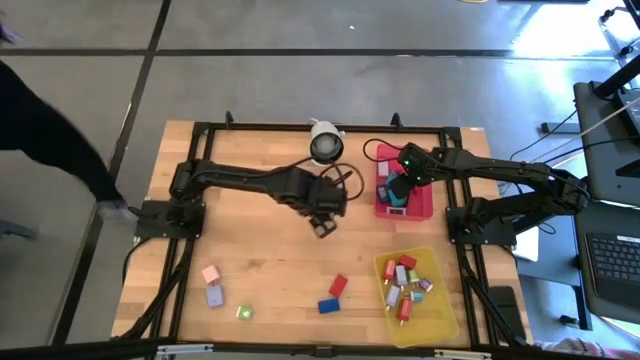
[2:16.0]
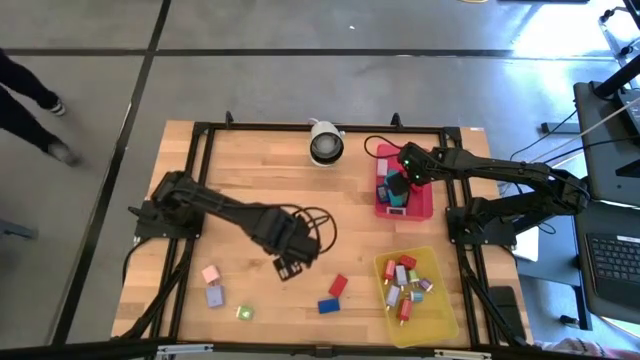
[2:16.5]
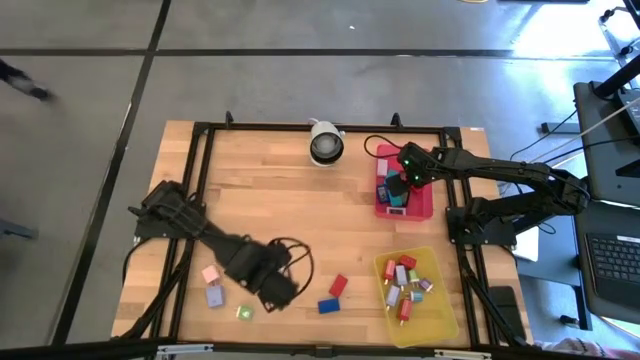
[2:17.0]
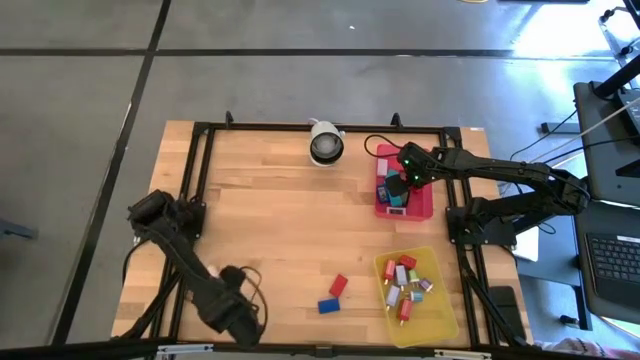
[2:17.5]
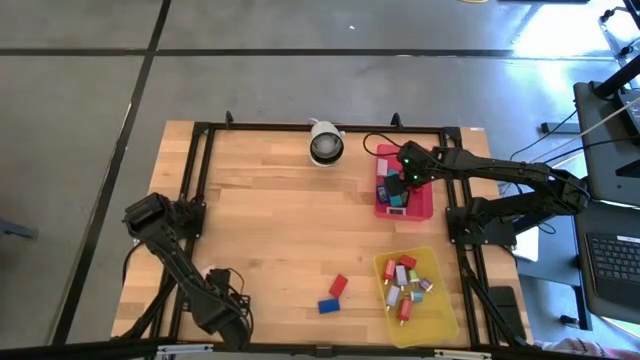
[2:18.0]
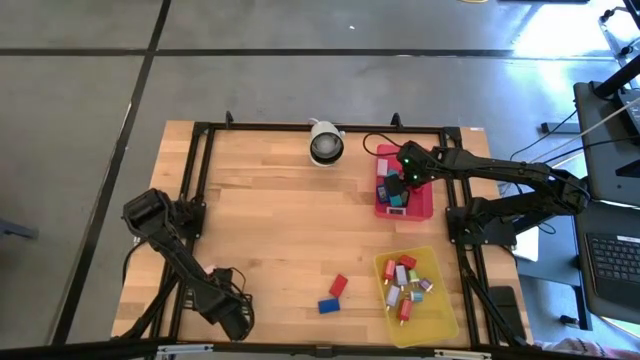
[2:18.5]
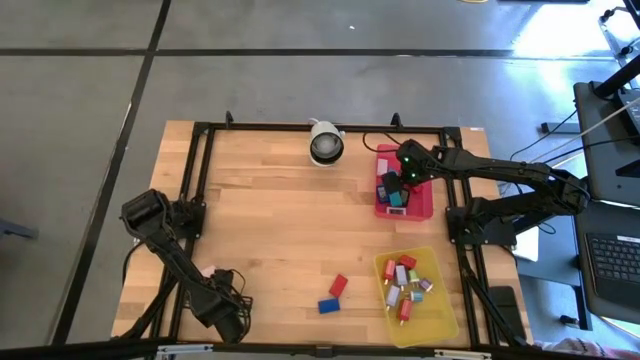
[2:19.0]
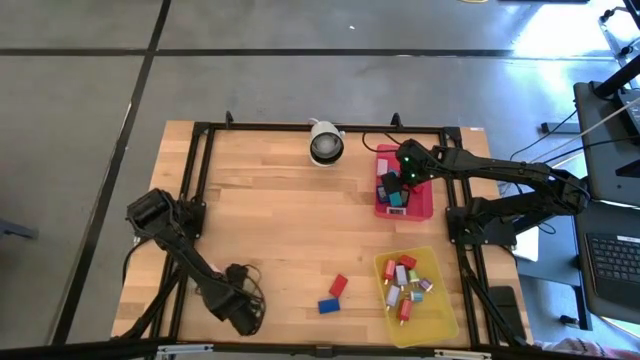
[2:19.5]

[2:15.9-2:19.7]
Task: Pick & Place Office items
Put the purple charger adapter into the yellow bin

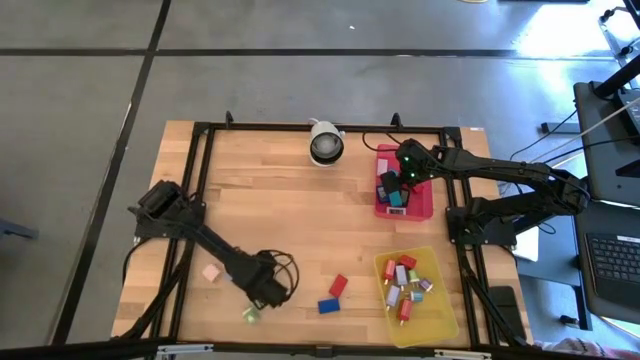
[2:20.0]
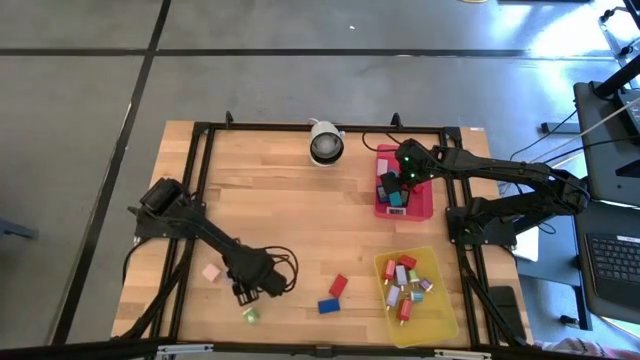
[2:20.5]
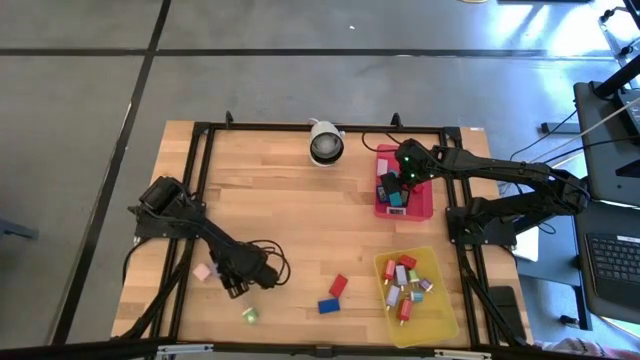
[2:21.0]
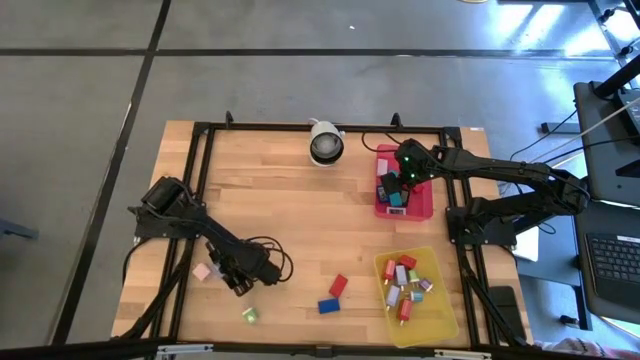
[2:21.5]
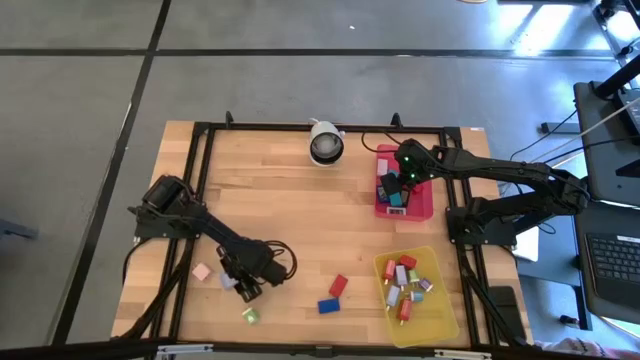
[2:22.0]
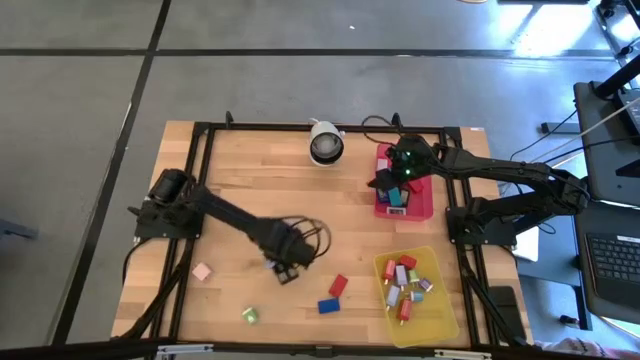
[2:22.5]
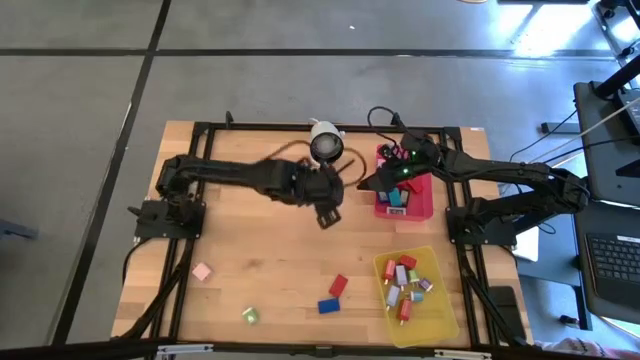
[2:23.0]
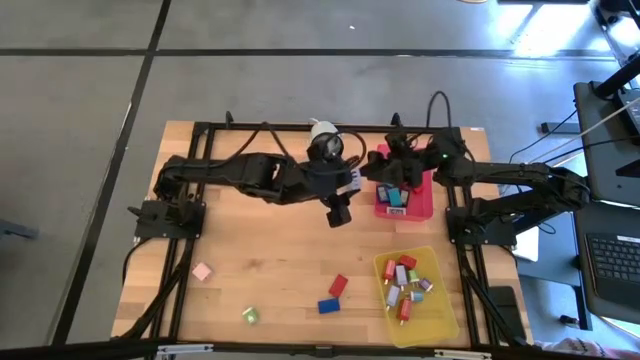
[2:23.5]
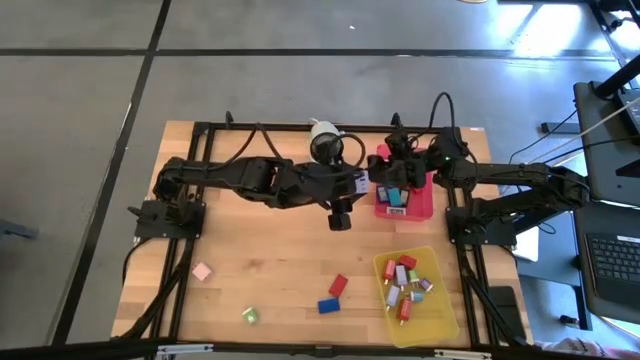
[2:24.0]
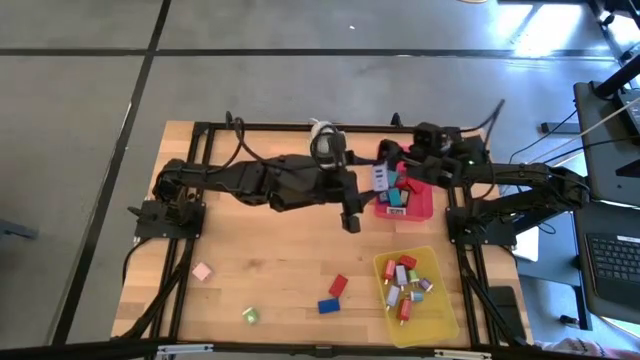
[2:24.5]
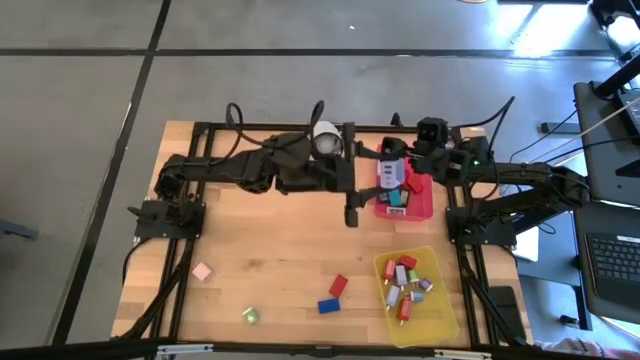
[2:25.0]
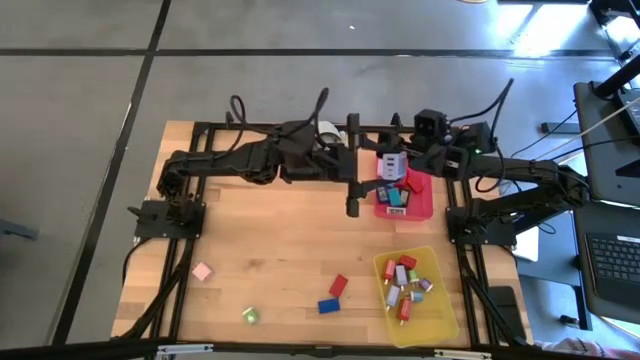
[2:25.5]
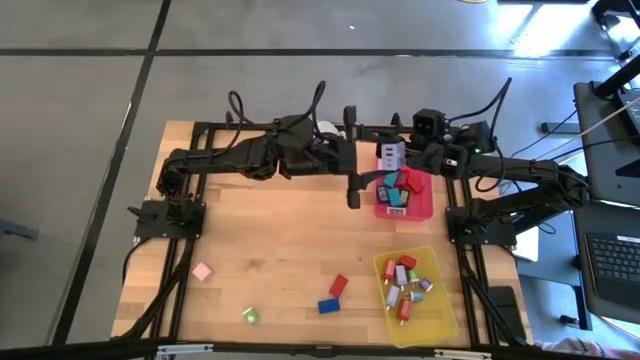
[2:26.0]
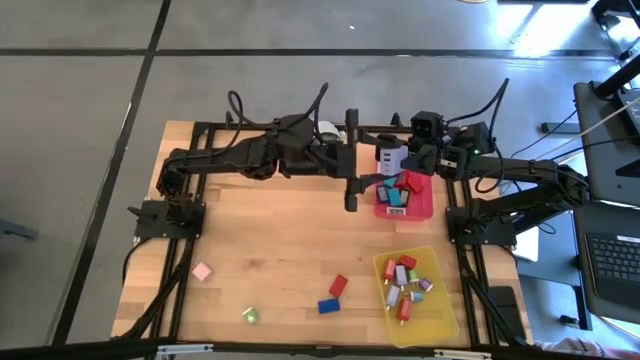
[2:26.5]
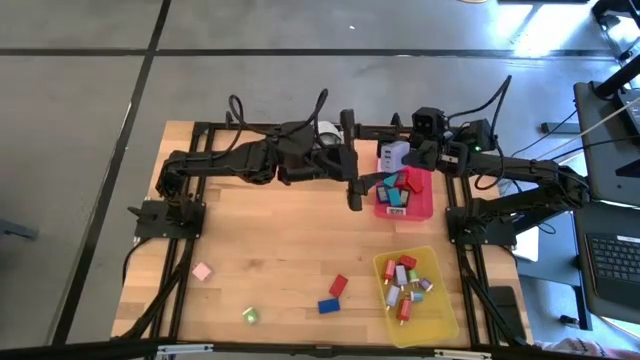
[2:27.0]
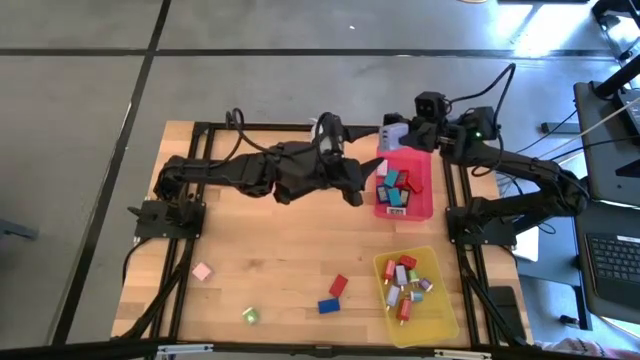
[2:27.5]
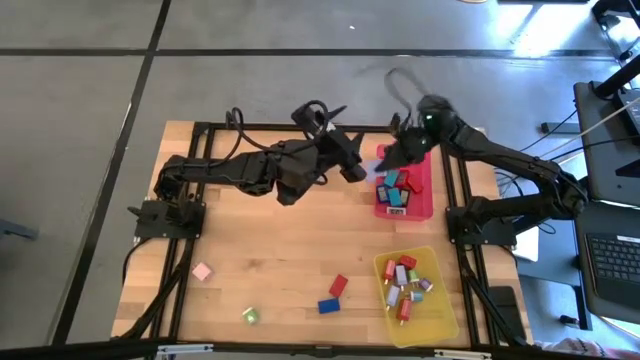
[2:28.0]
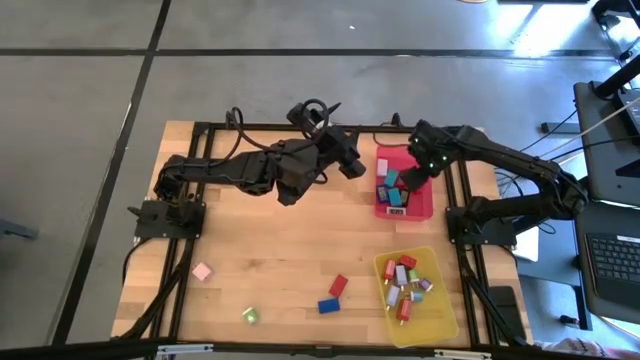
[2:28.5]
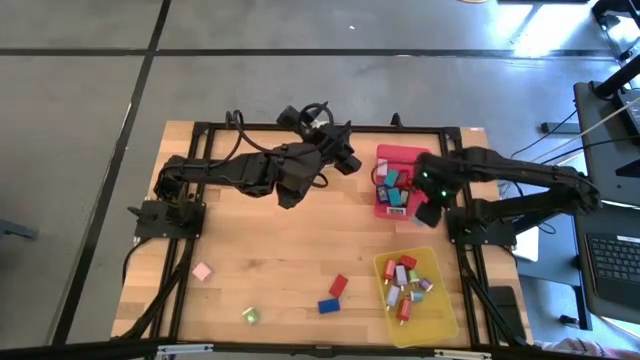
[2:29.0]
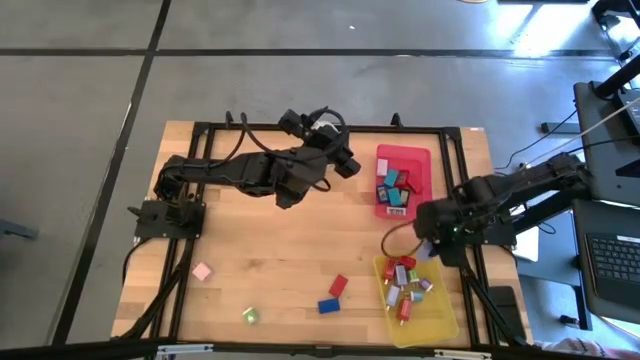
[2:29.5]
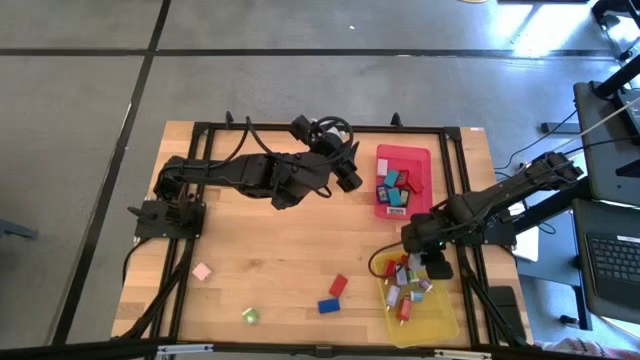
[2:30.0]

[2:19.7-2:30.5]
Put the purple charger adapter into the yellow bin

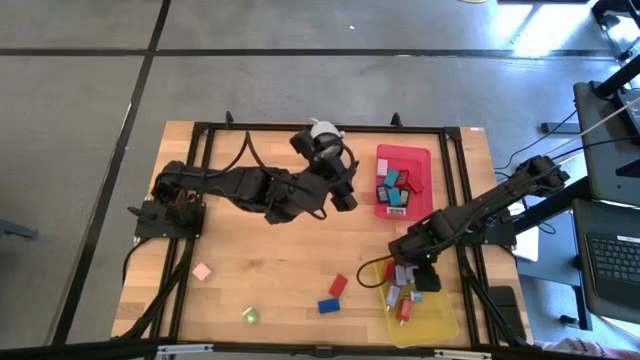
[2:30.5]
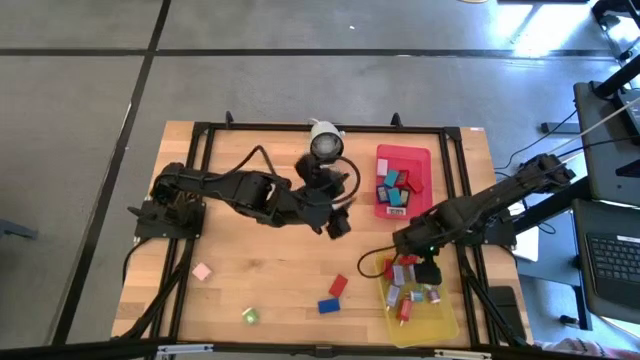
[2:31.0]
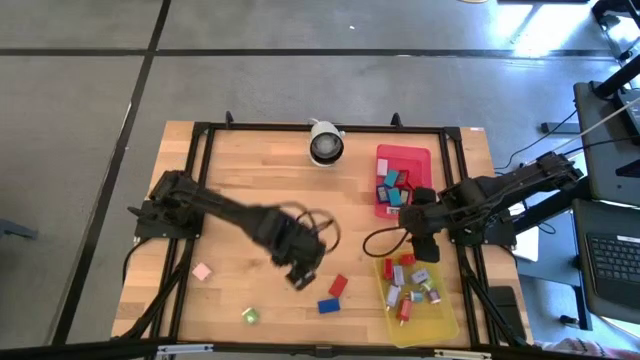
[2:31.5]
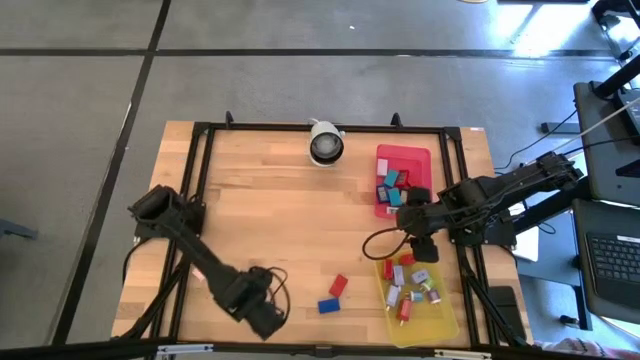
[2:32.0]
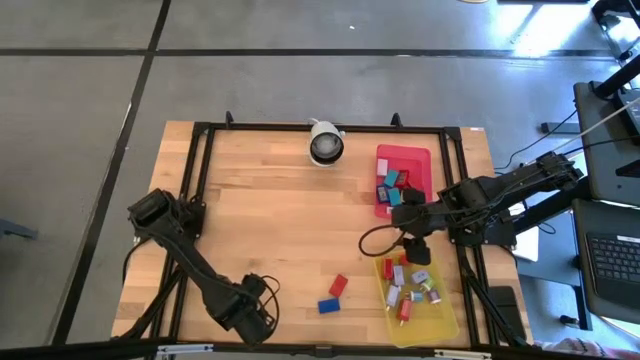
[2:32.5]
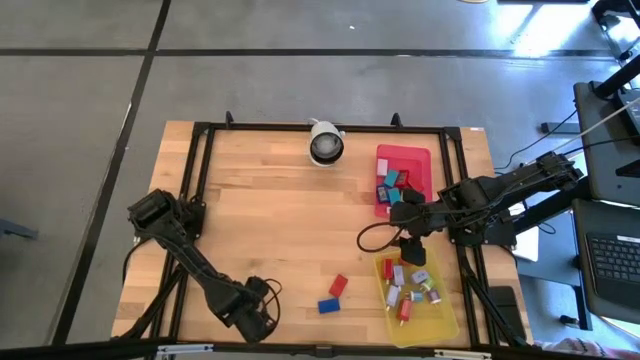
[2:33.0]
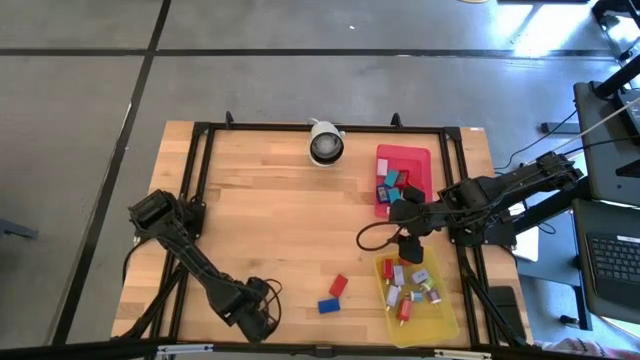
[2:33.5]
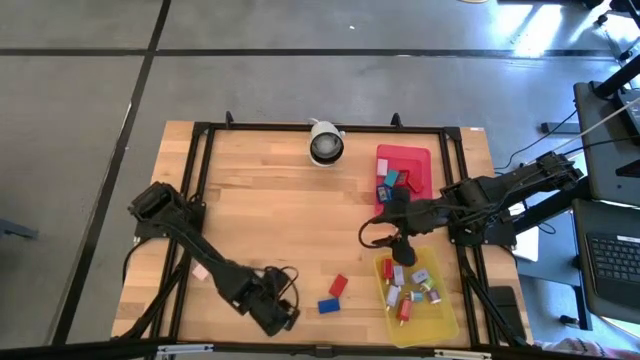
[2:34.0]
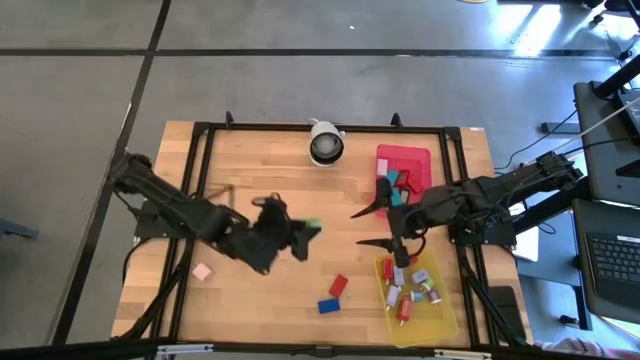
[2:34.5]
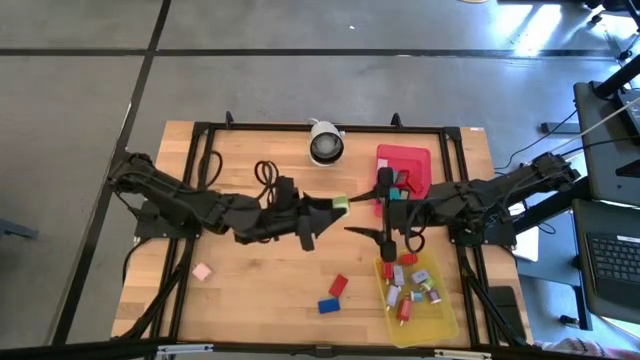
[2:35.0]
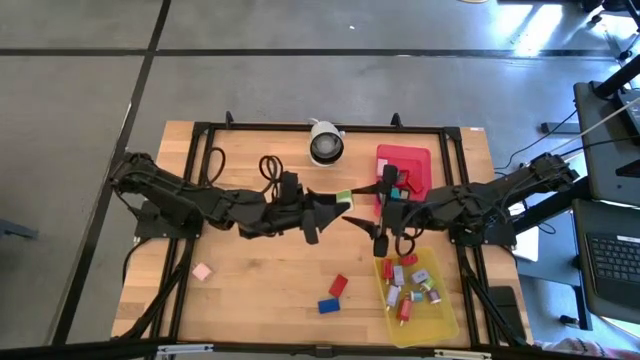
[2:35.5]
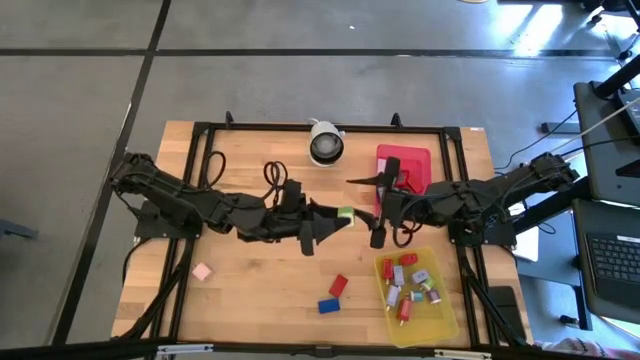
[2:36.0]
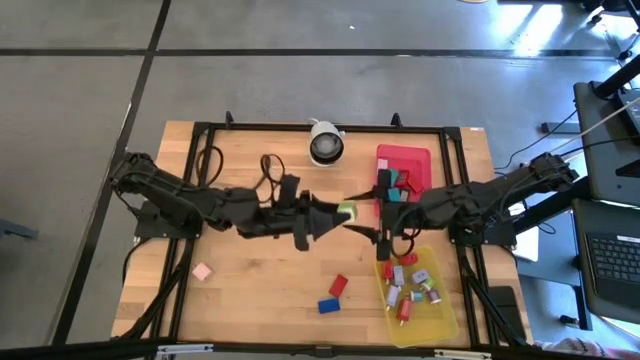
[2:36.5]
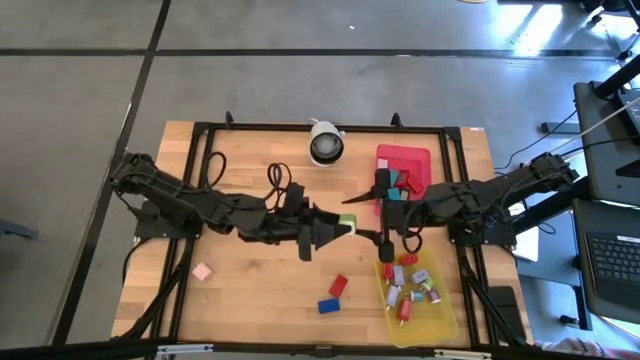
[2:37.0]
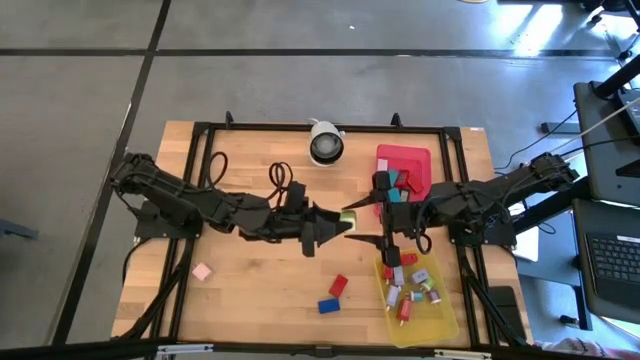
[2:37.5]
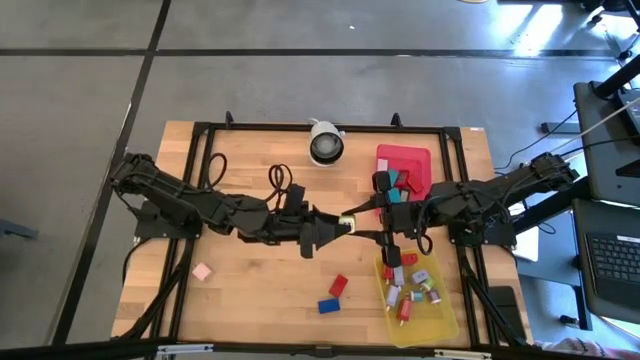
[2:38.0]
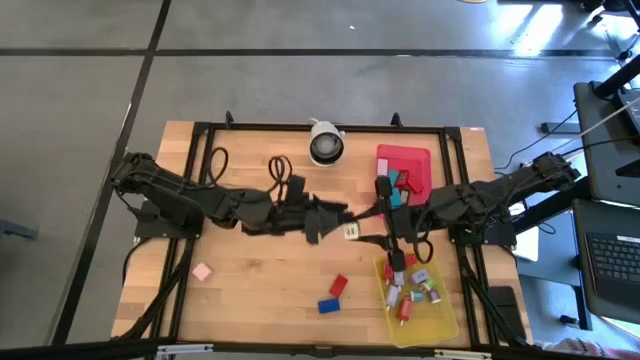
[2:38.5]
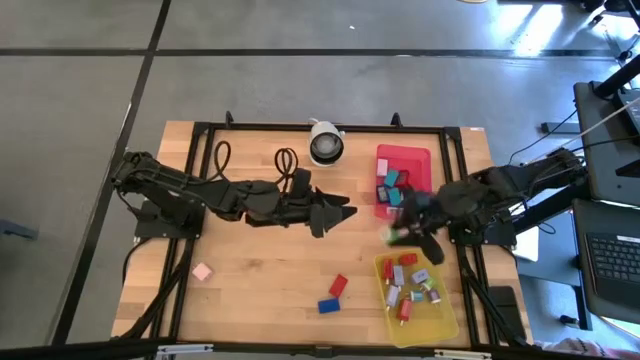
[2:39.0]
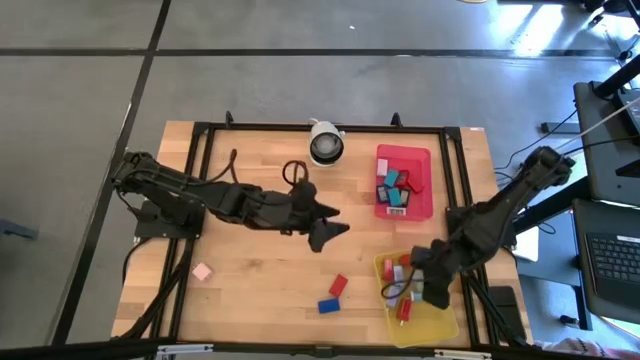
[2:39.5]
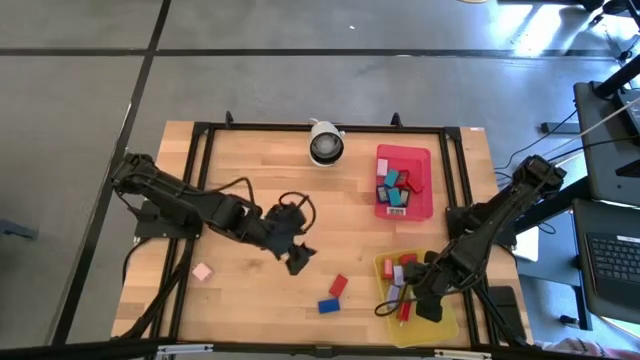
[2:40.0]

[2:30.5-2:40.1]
Put the green charger adapter into the yellow bin
